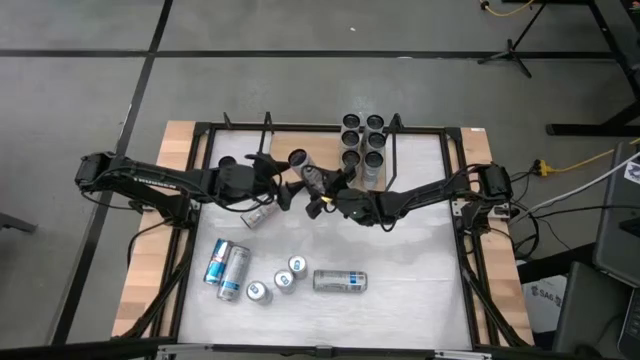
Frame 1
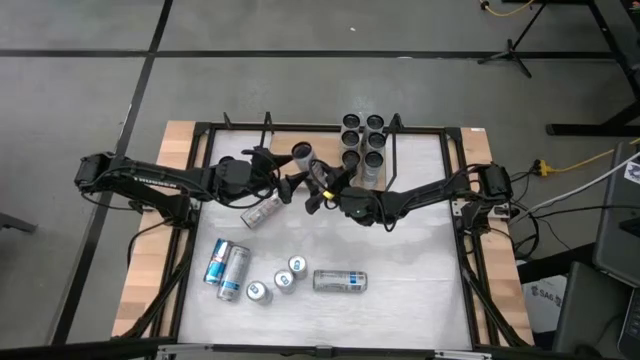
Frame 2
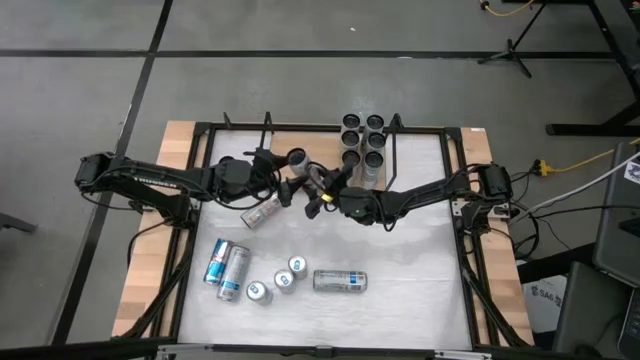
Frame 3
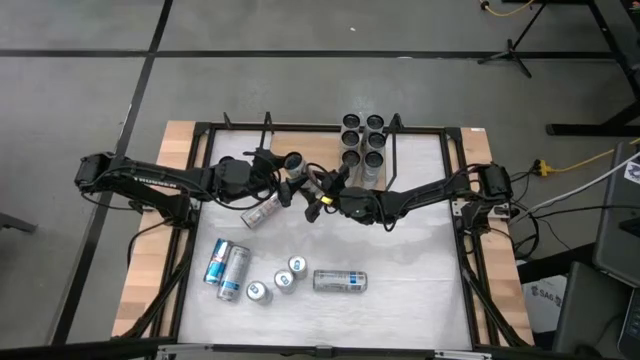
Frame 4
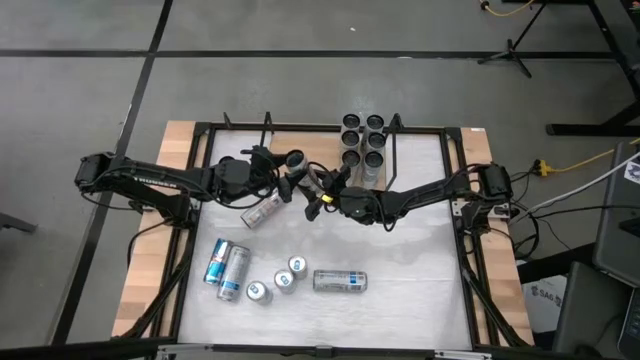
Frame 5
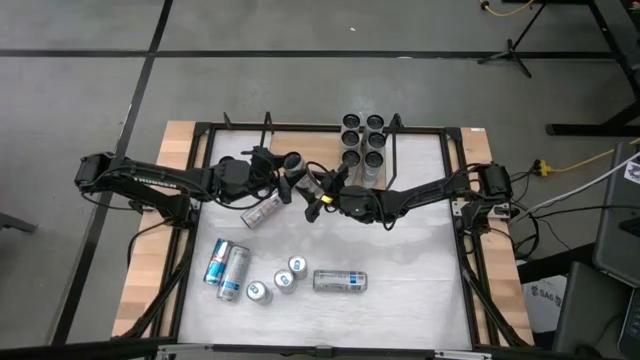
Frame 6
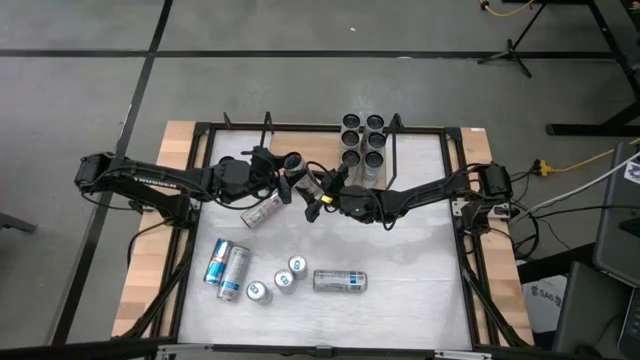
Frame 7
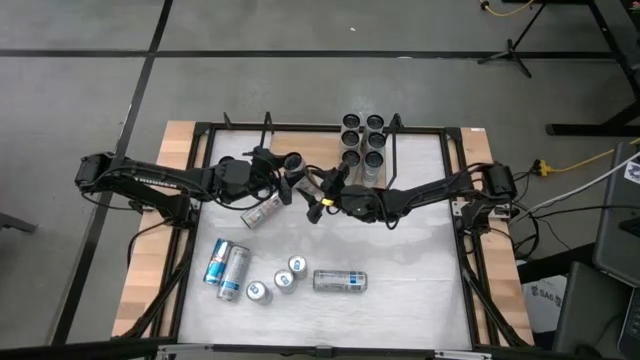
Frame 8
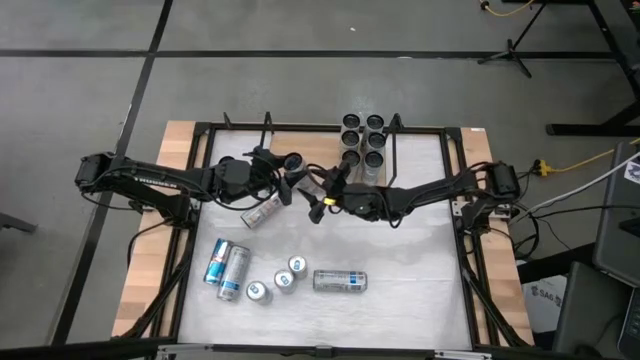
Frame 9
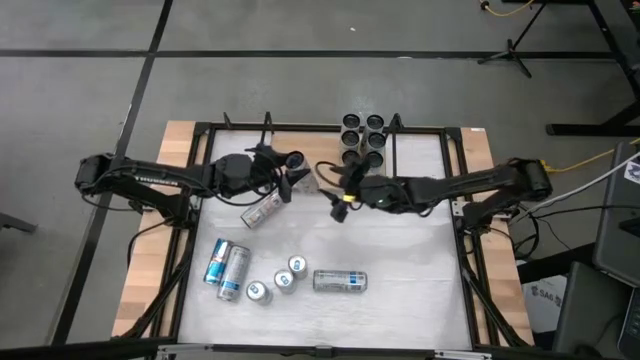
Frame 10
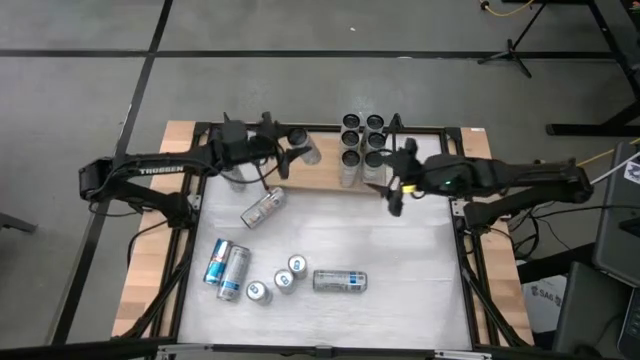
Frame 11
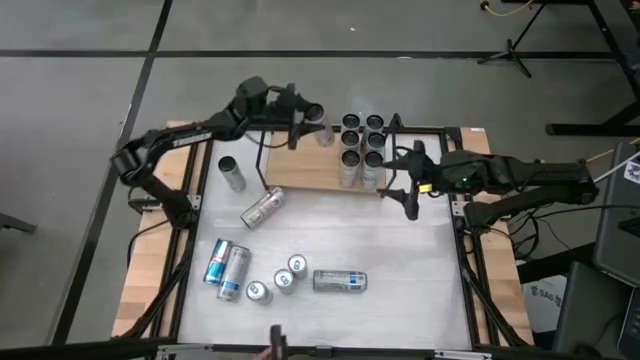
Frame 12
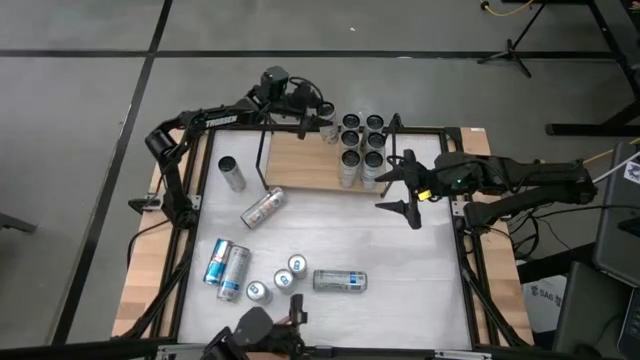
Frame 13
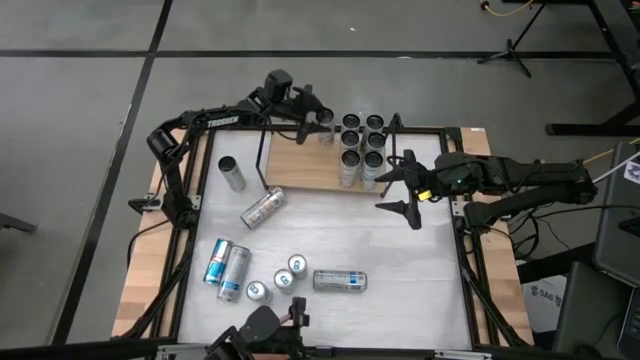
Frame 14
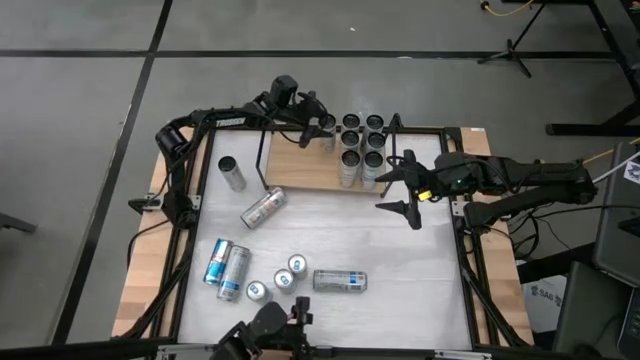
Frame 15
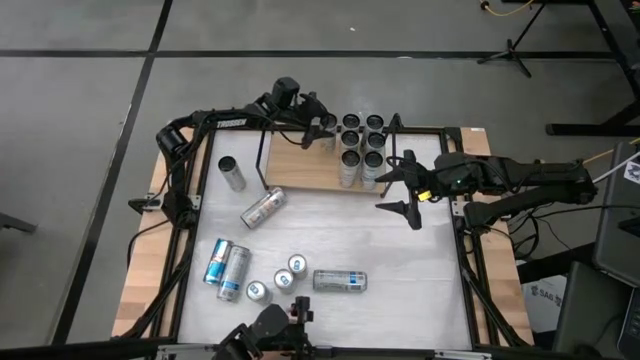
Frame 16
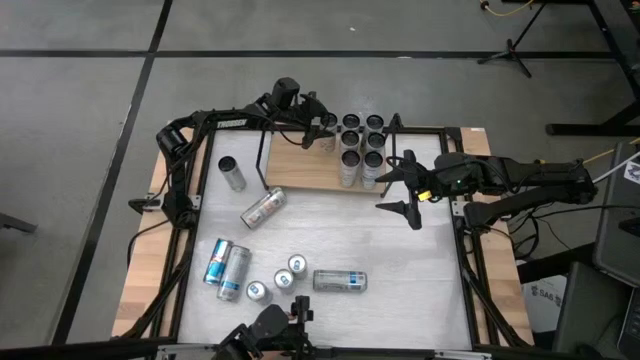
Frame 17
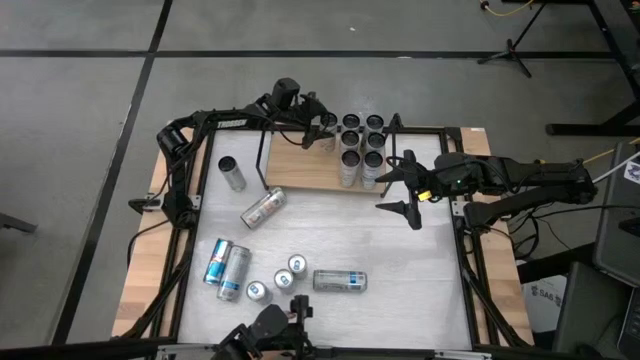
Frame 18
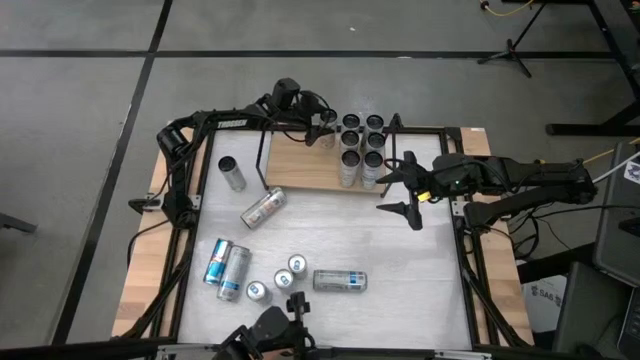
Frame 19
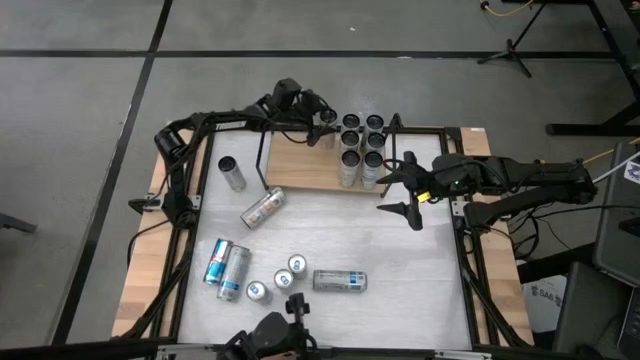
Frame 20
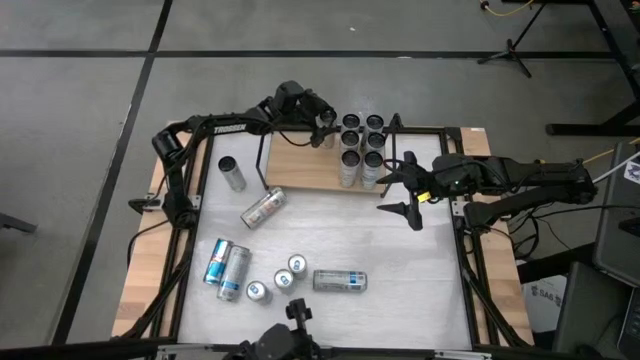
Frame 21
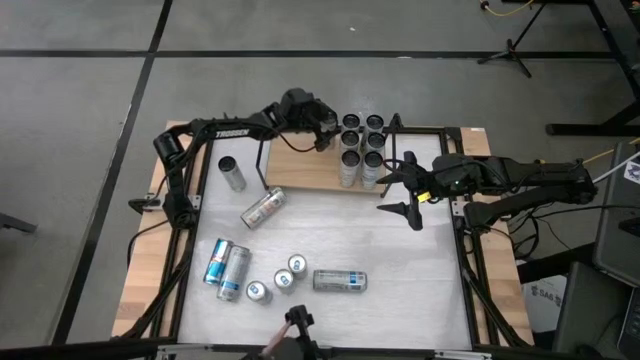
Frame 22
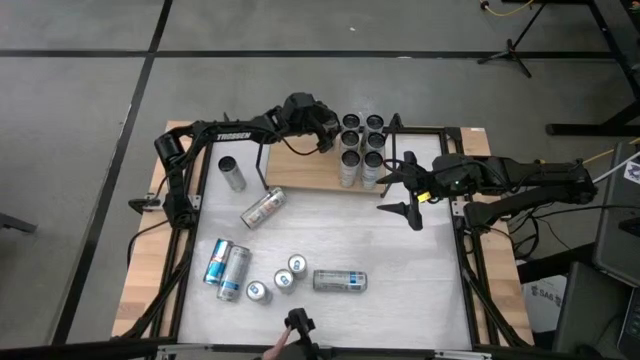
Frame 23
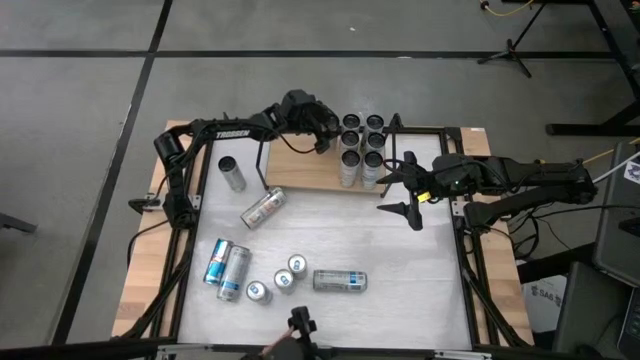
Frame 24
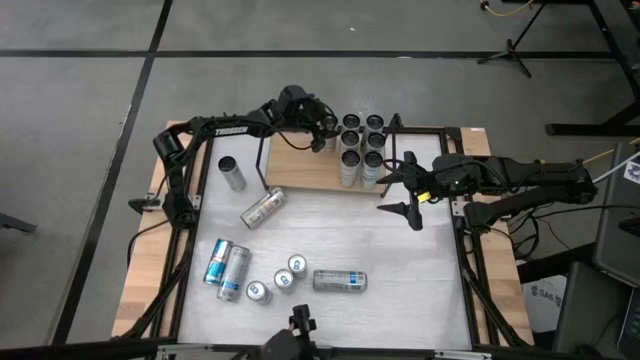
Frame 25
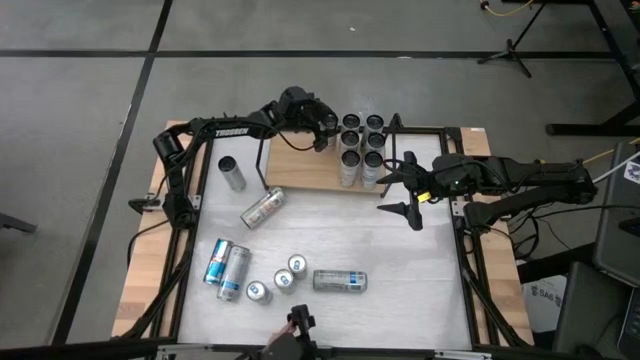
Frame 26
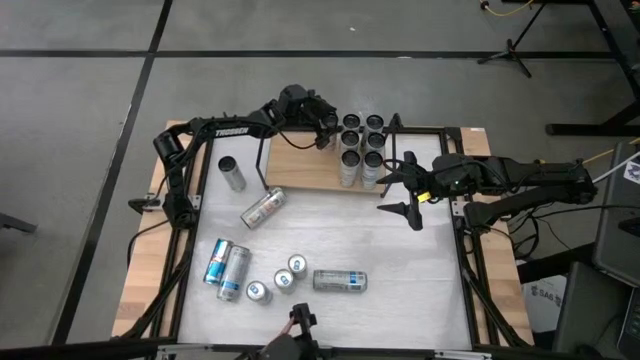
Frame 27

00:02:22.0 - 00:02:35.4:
Task: Place canned beverage on shelf
Put the white soda can on the shelf

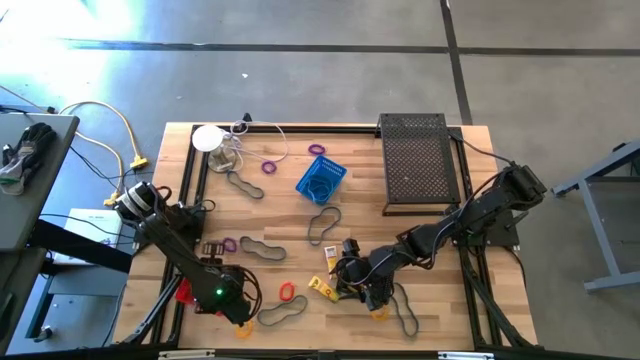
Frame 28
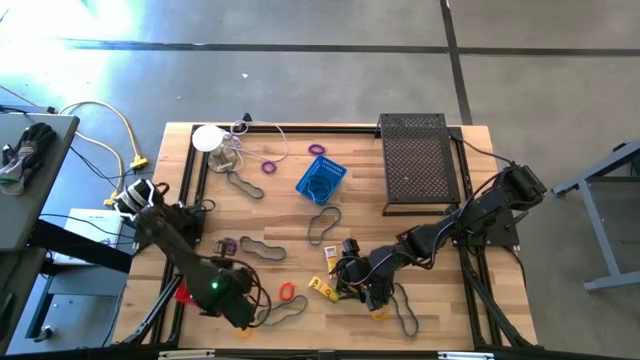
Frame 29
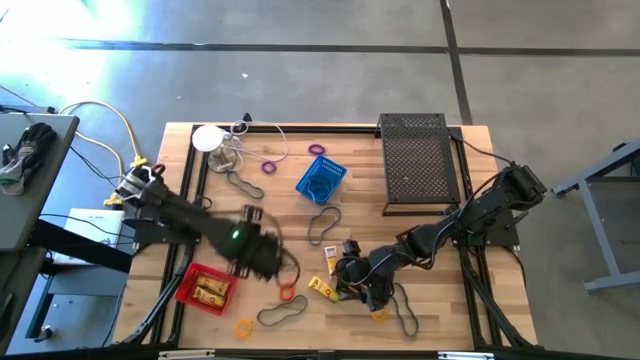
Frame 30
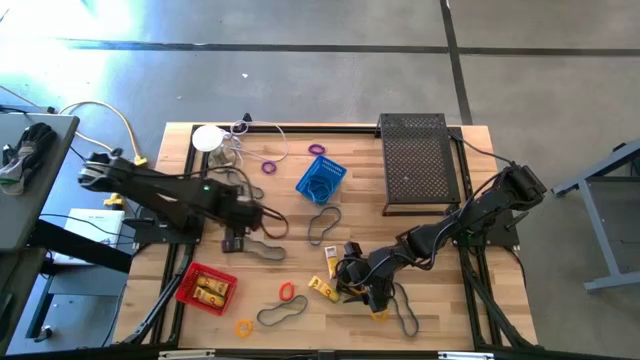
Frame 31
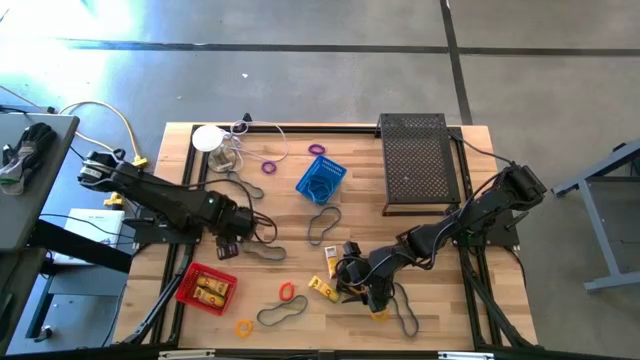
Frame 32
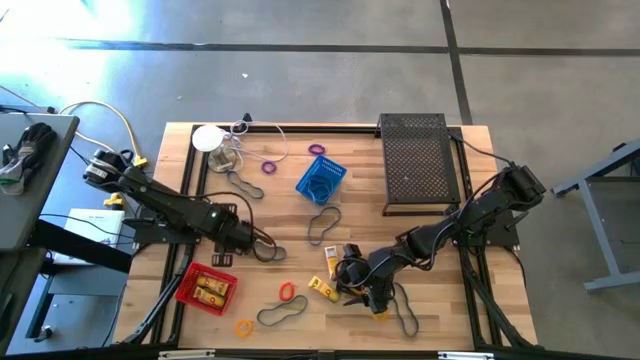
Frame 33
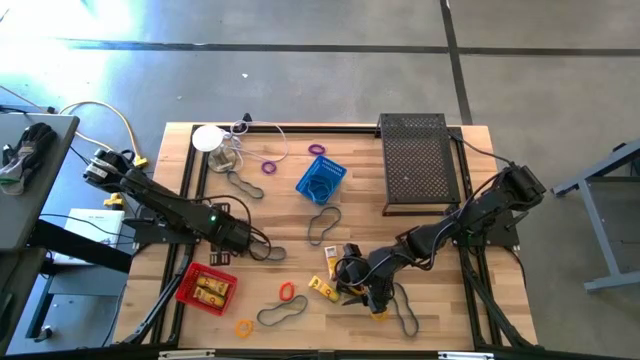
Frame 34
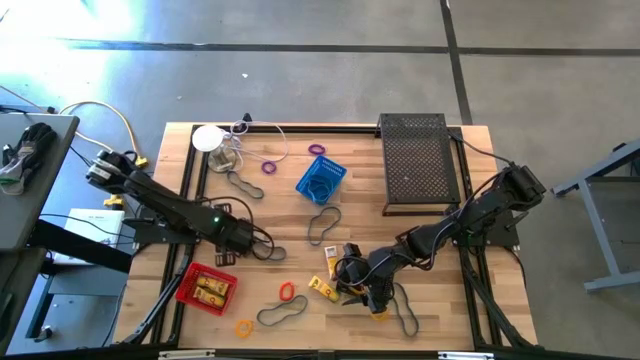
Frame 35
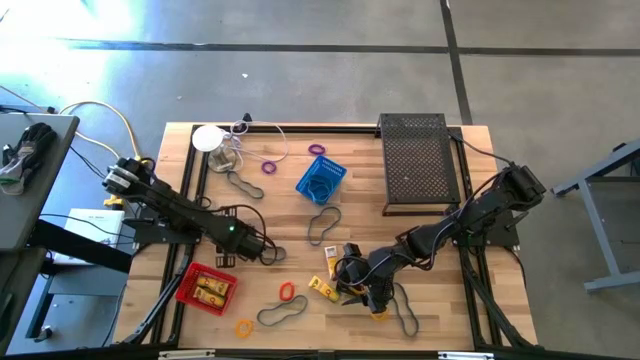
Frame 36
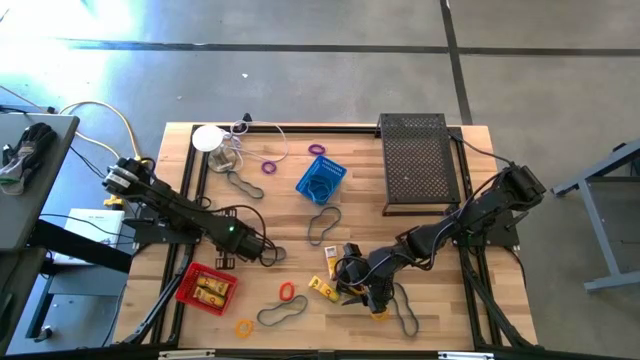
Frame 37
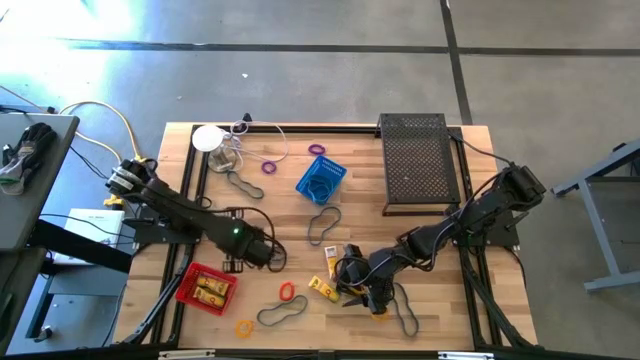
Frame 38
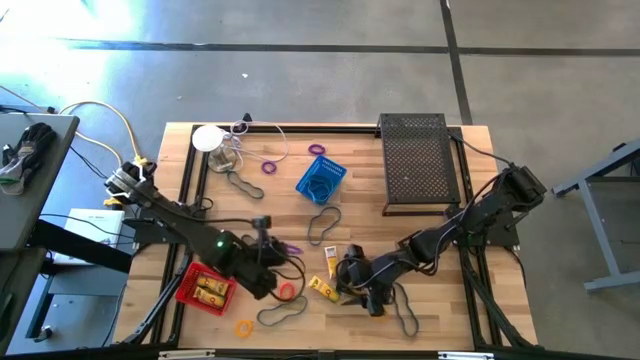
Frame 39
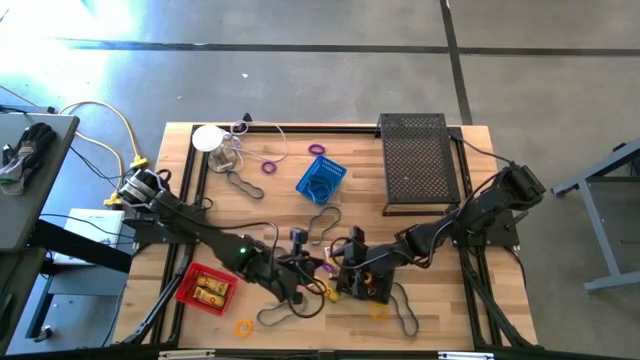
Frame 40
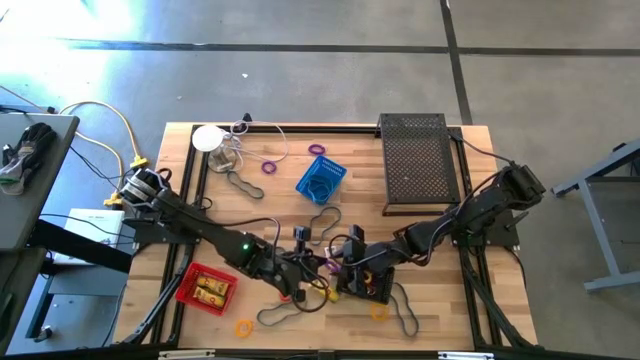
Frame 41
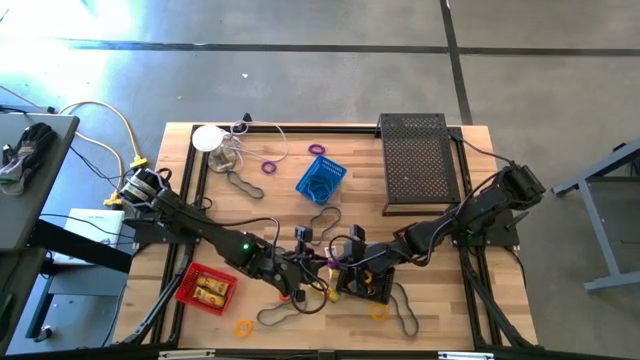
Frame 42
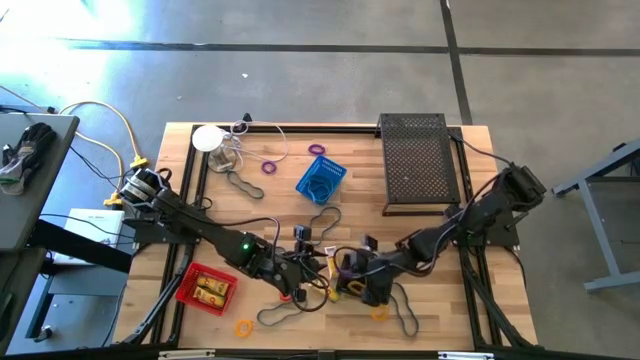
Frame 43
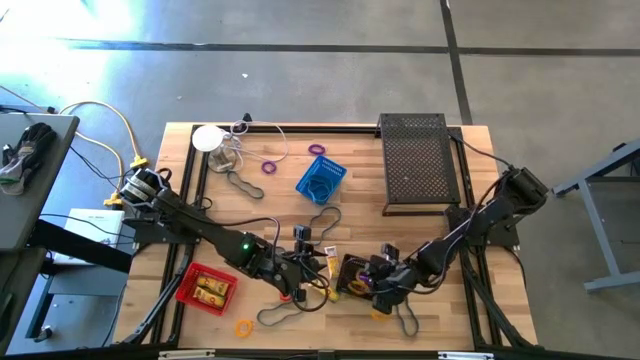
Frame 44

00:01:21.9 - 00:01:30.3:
Task: Pick & Place Office Desk Supplies
Put the bottom purple wrist coil keychain into the black bin
